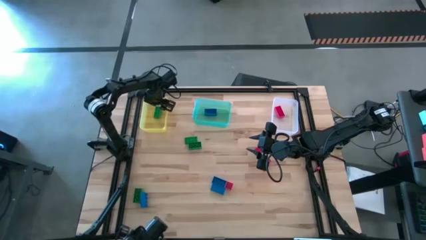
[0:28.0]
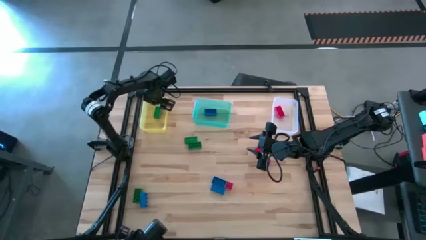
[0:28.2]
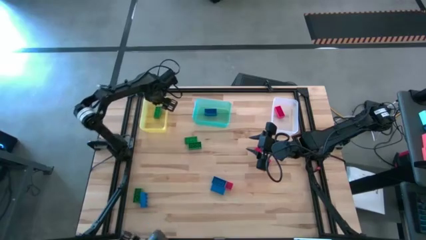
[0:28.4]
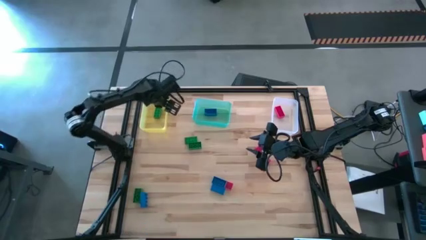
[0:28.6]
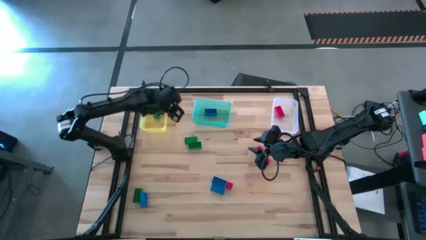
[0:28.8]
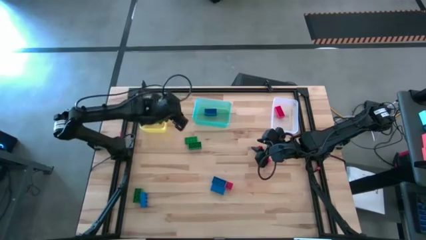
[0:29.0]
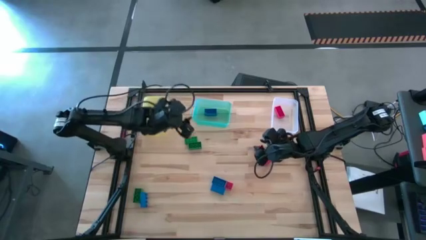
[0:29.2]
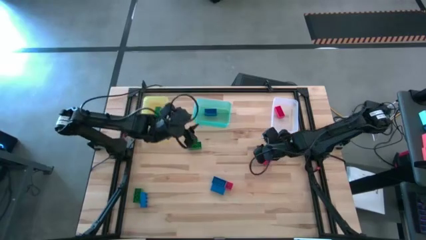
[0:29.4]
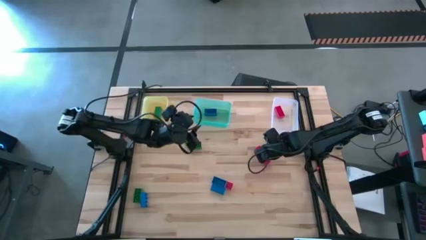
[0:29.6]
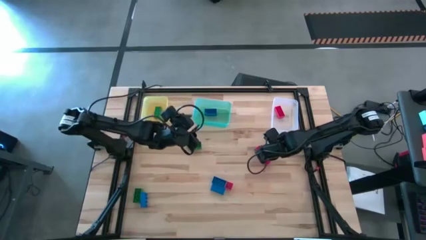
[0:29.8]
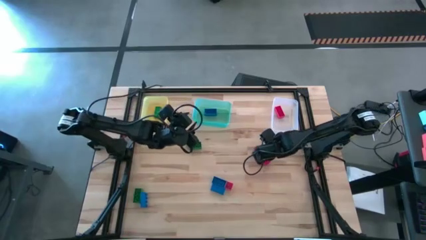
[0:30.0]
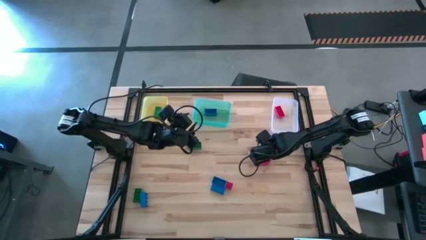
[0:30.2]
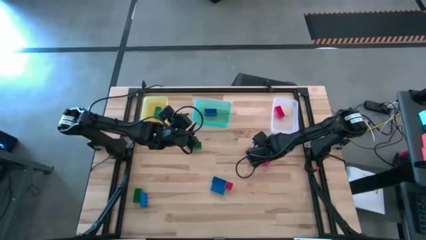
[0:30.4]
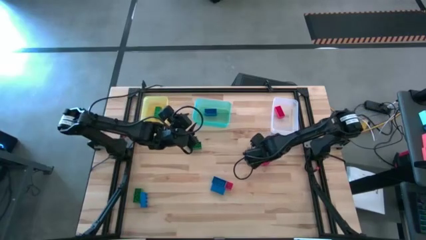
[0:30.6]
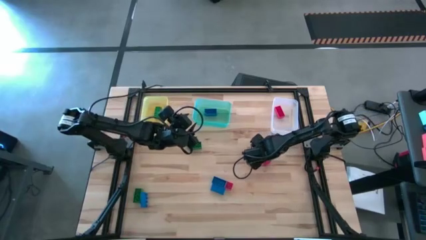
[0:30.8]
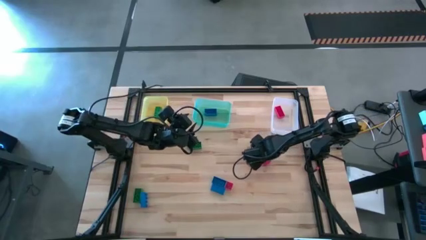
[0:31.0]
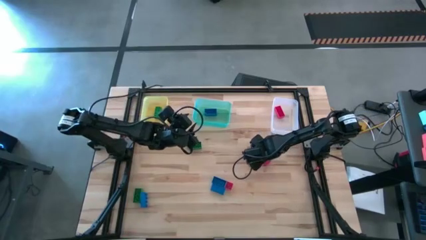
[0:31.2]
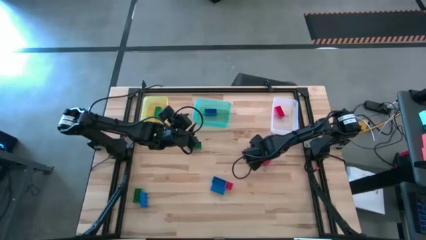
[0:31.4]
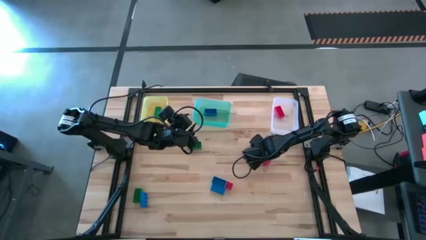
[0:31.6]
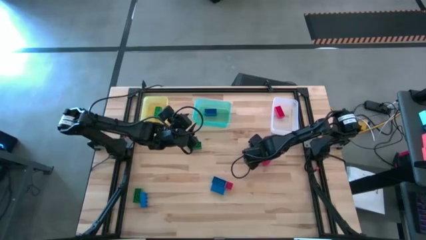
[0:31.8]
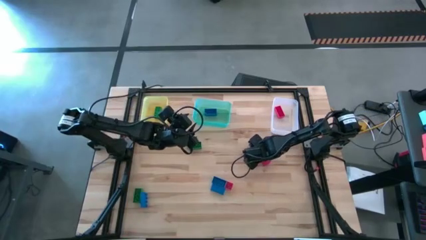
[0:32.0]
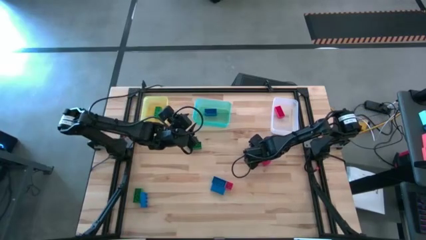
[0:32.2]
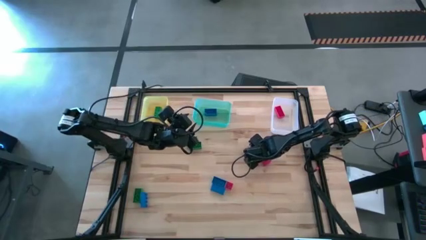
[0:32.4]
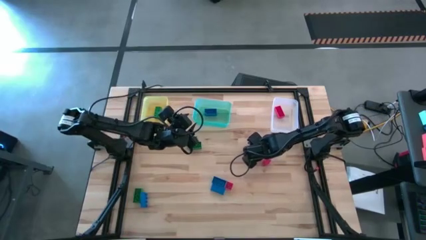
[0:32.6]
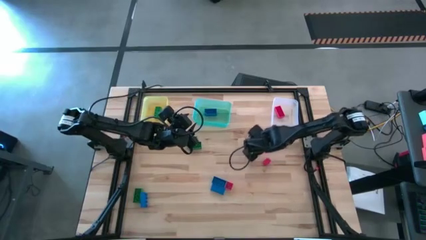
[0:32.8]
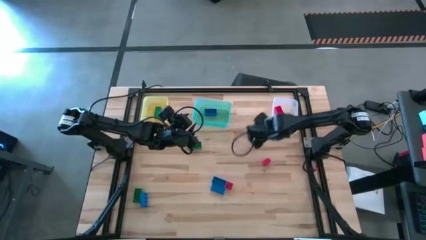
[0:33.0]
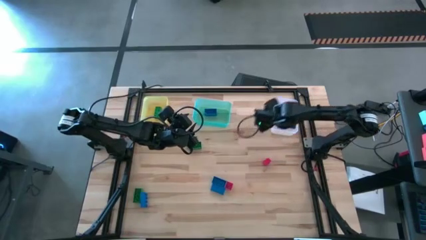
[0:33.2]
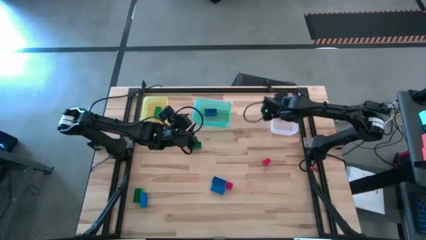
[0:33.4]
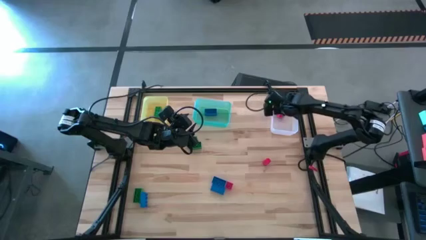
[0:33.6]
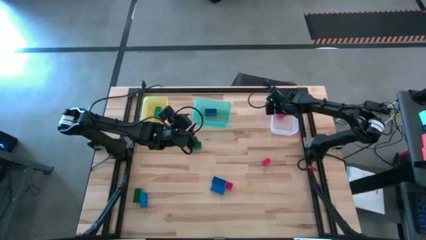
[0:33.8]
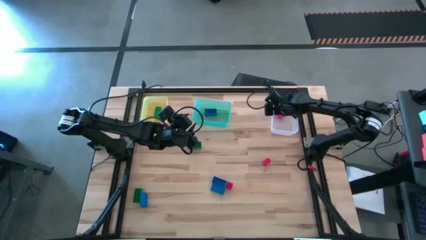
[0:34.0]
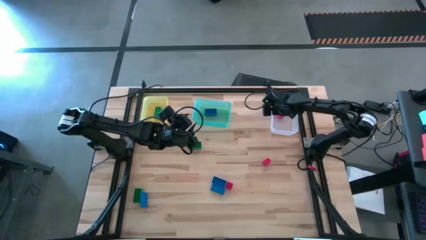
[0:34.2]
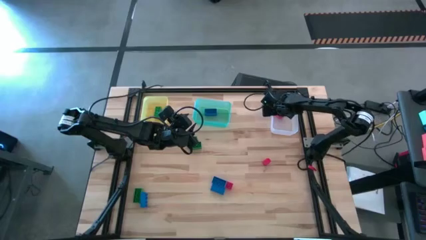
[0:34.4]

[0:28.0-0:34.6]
Task: Sort & place blocks by color
Put red game piece into the transparent bin

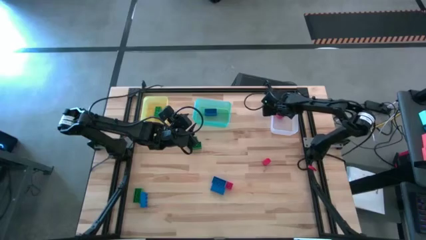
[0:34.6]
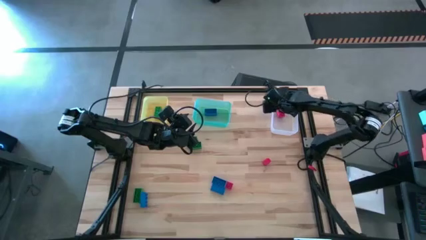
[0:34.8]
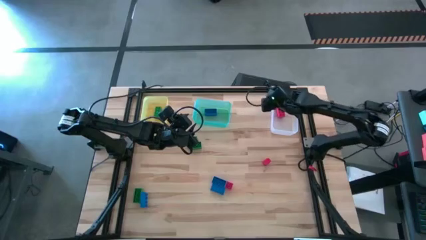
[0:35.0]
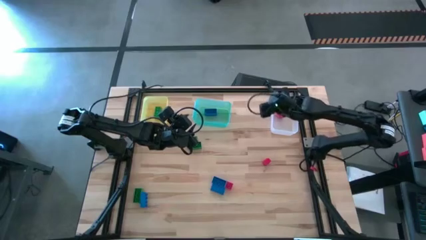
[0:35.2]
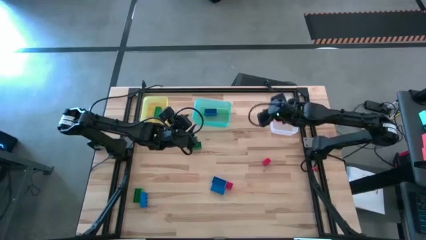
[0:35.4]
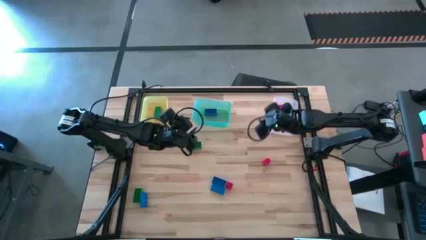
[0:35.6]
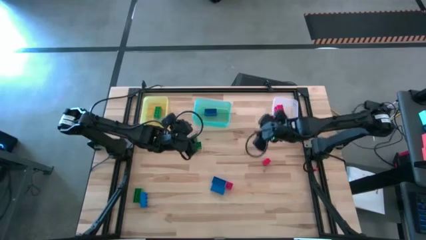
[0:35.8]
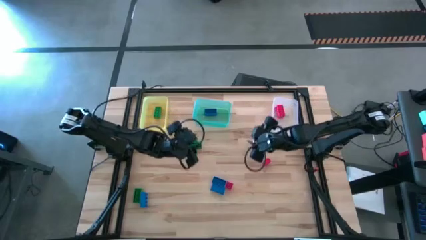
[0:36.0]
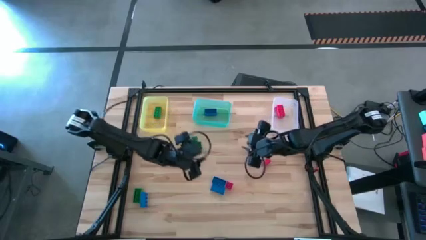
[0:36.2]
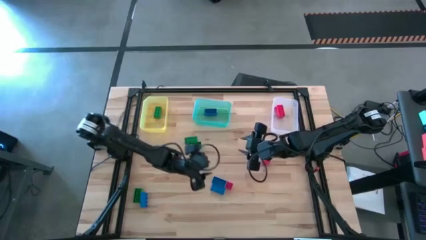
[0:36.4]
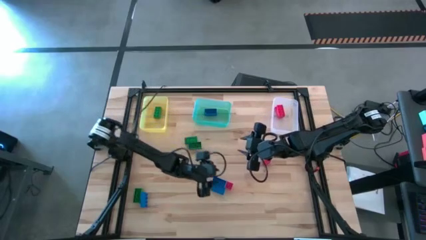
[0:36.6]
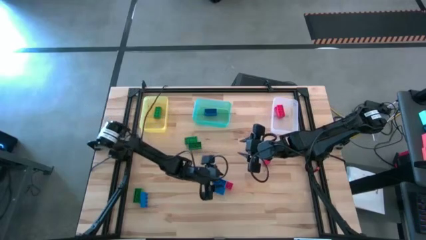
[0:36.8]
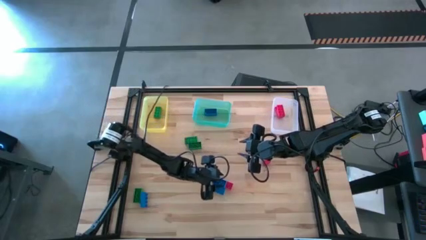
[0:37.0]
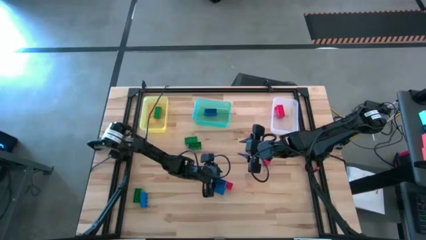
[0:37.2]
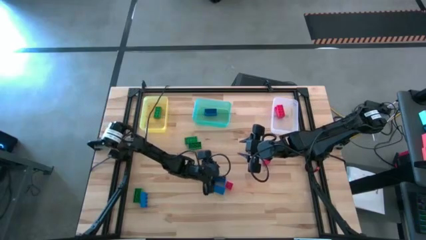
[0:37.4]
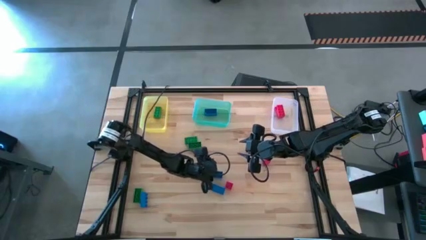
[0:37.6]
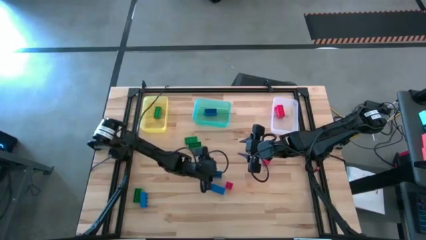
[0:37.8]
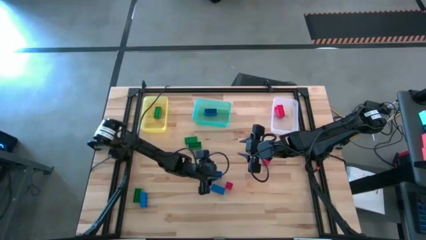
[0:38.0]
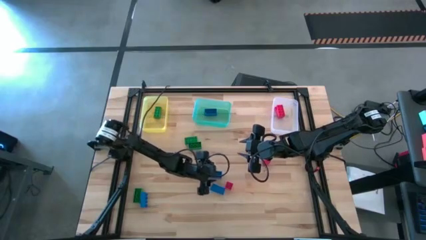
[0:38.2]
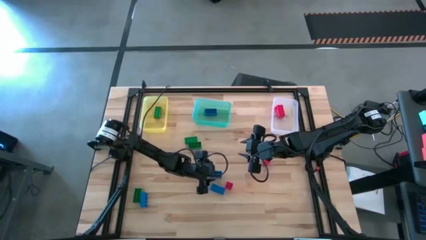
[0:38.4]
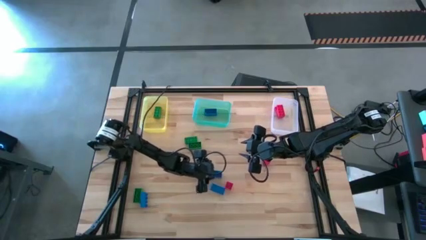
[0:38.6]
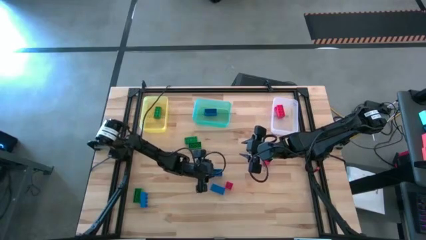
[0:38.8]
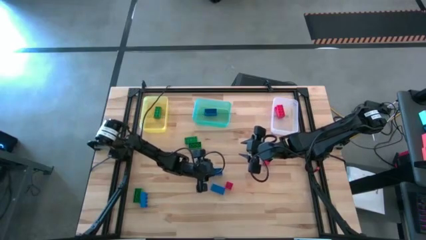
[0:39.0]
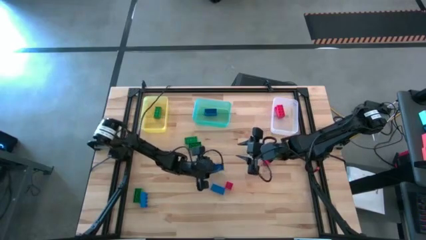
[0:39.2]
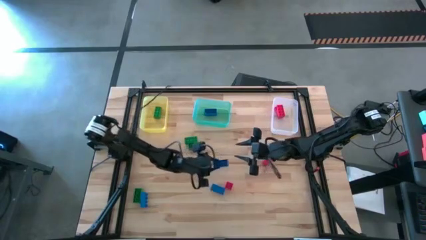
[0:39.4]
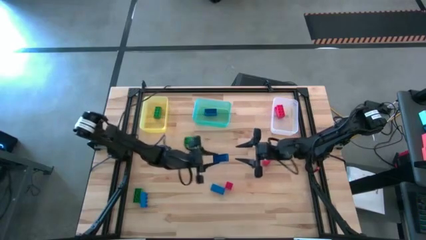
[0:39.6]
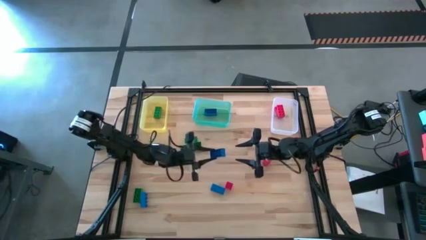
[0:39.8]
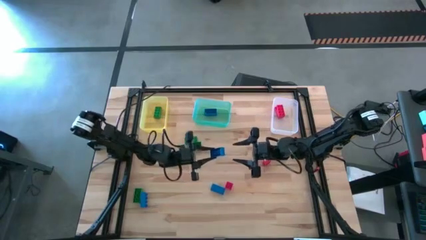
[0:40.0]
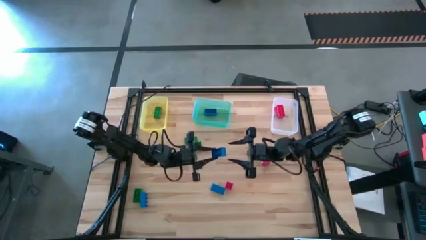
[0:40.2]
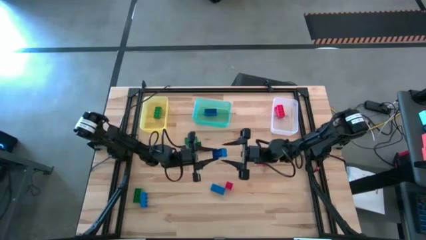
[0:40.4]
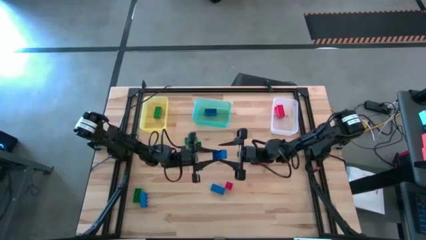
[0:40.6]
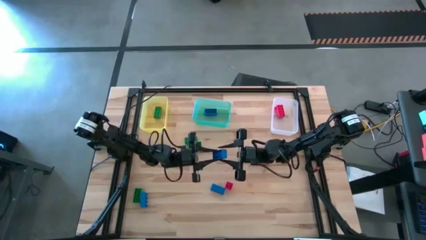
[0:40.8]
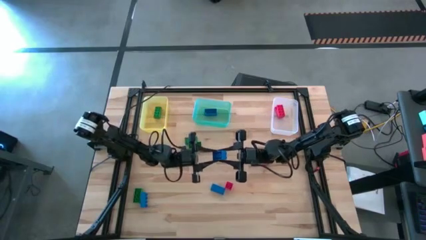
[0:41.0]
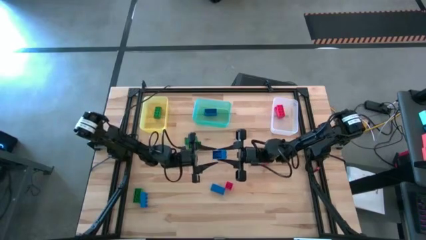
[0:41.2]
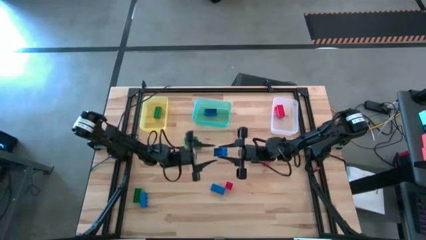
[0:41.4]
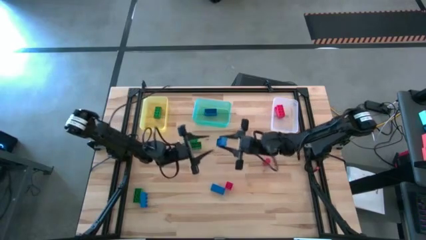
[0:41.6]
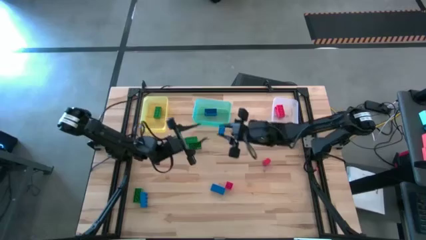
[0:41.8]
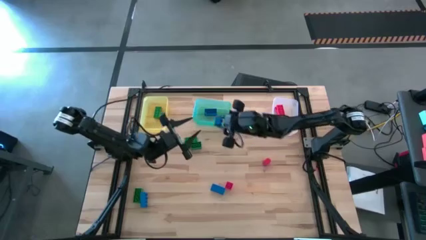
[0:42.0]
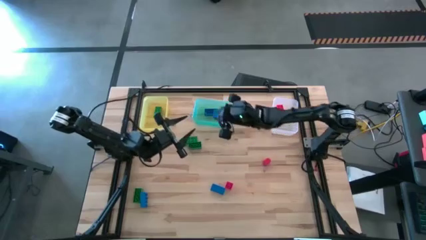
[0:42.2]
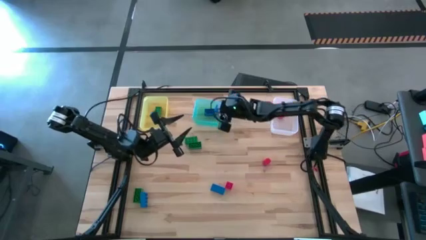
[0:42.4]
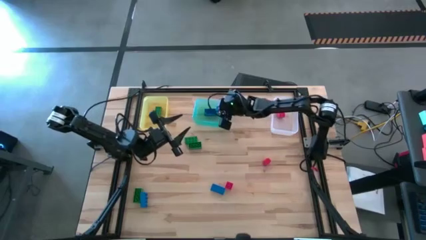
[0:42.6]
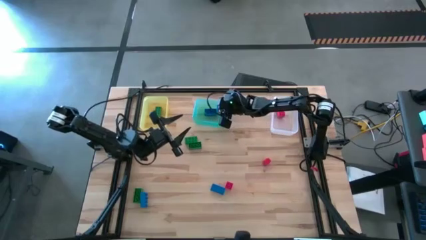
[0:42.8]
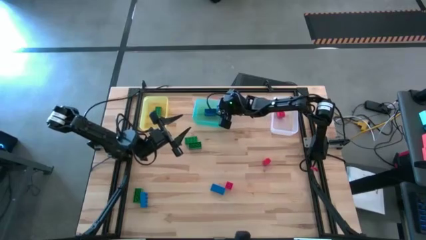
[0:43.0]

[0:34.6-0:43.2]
Put the blue game piece into the green bin

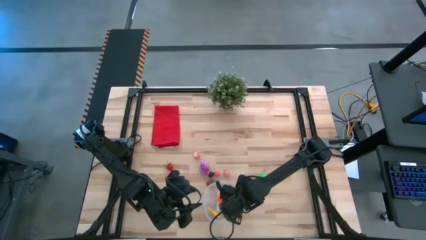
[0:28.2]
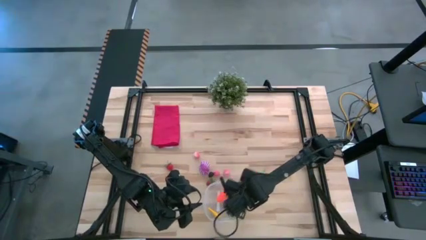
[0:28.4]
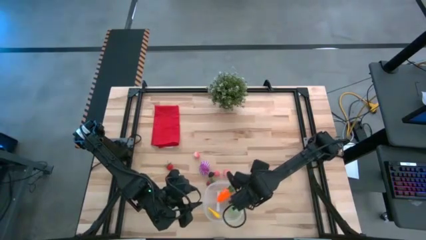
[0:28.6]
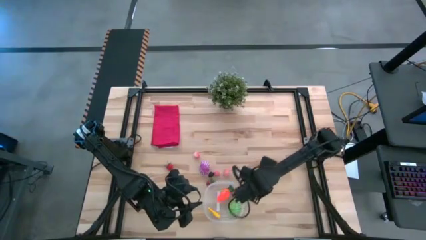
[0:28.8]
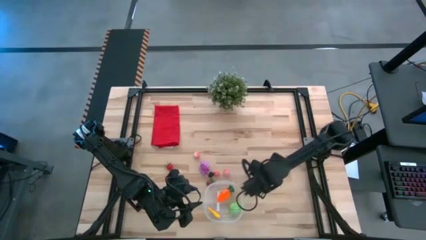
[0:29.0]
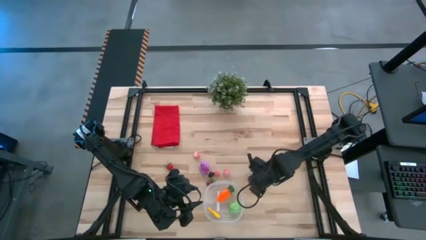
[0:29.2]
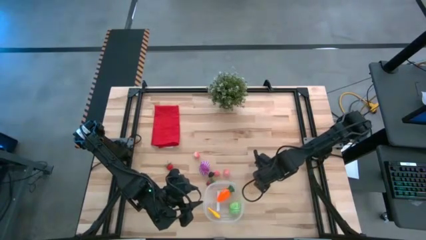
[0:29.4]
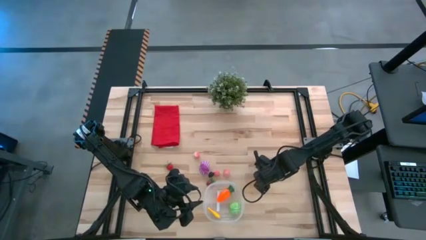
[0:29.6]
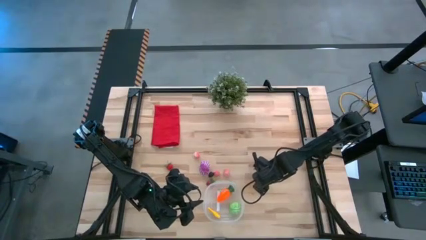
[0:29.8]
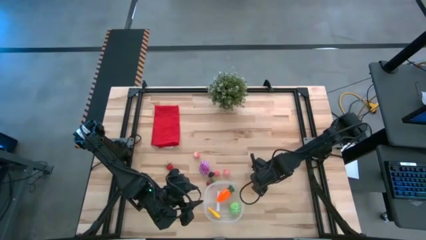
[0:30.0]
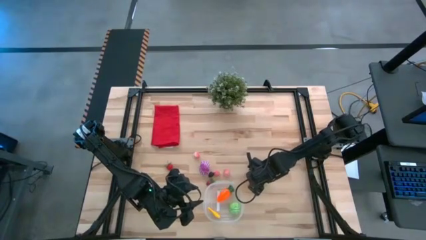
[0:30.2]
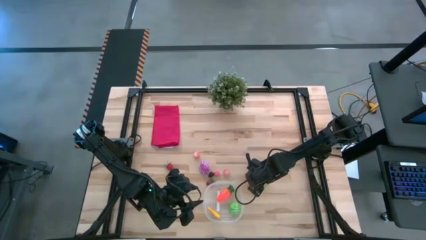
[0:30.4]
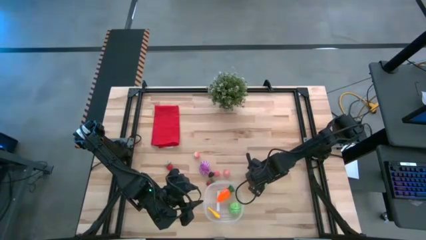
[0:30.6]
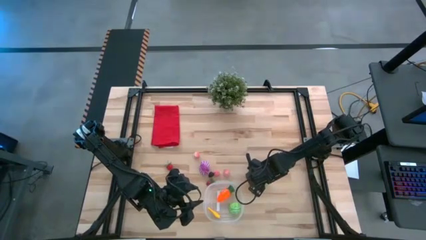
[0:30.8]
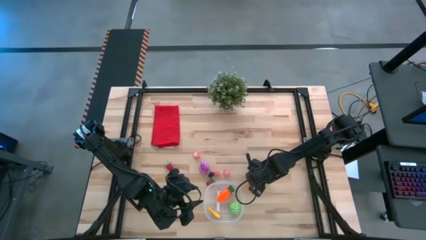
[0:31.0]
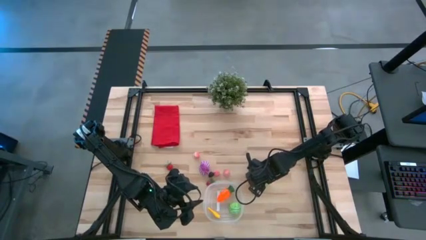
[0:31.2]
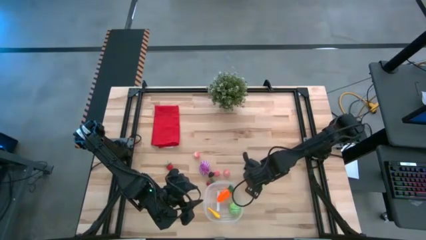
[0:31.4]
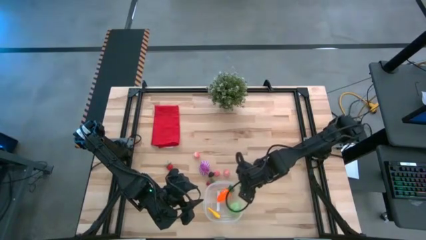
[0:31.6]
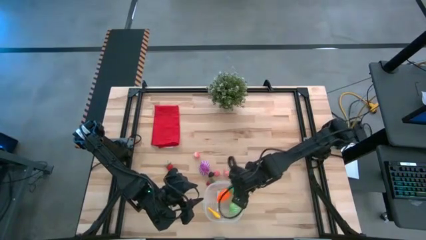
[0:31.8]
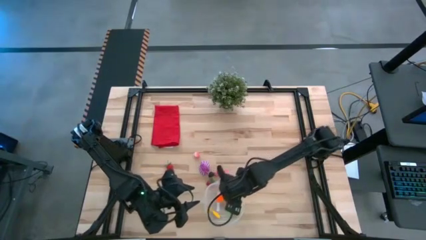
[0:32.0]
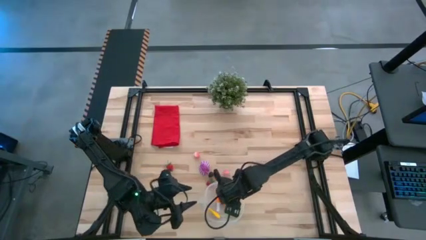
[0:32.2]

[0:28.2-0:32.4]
Task: Pick and placing Produce into tupperware
Put the green apple into the transparent bin
